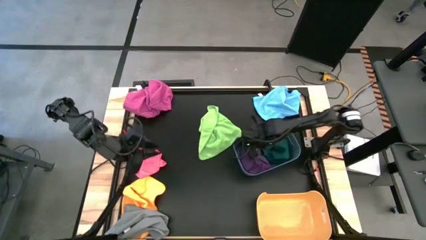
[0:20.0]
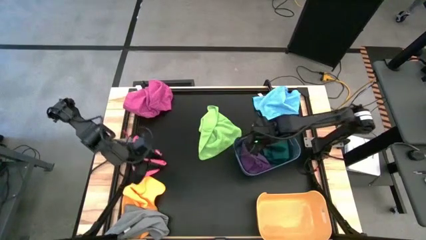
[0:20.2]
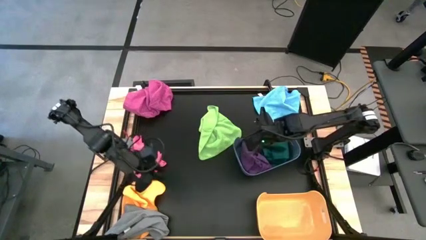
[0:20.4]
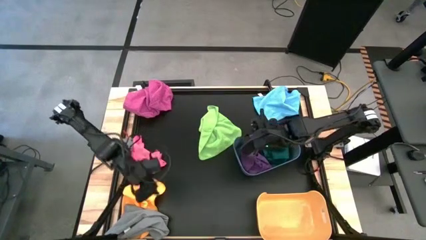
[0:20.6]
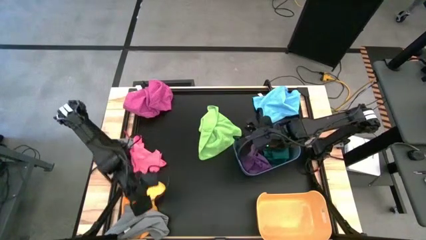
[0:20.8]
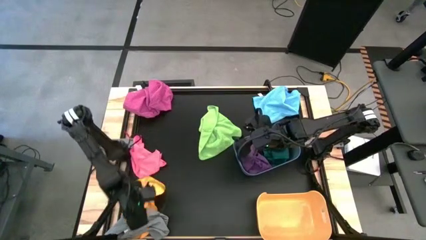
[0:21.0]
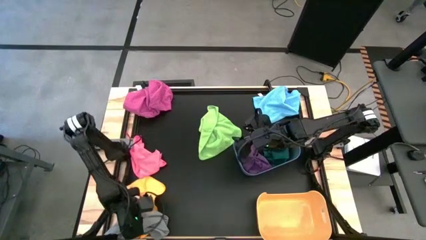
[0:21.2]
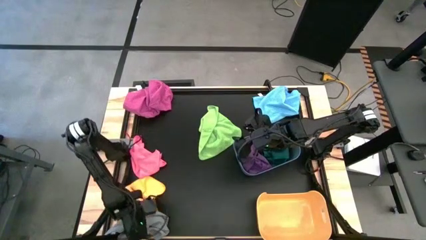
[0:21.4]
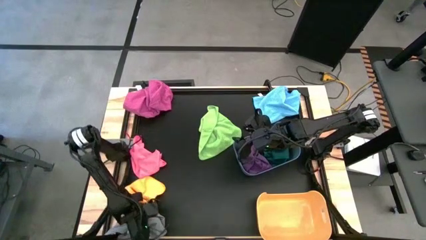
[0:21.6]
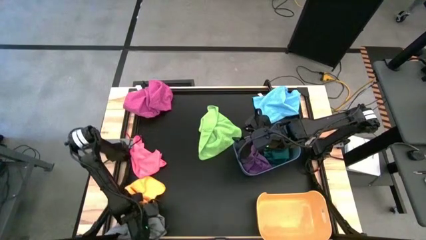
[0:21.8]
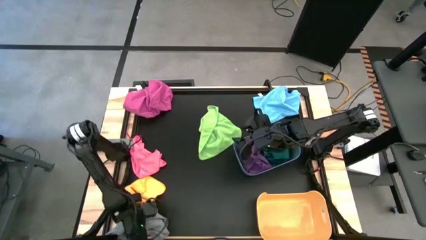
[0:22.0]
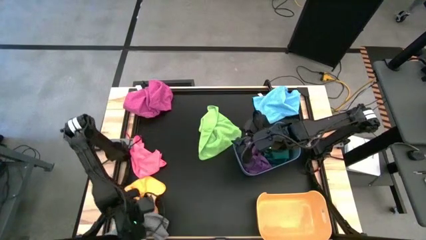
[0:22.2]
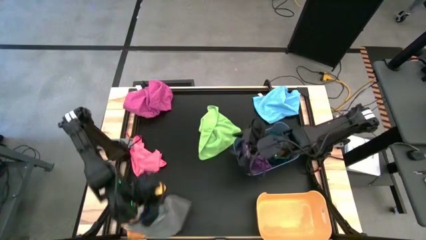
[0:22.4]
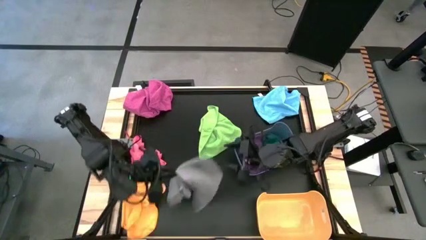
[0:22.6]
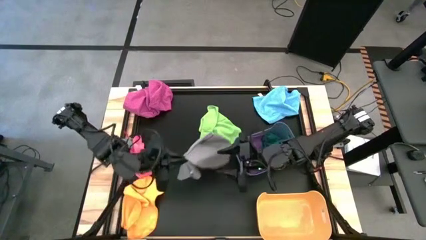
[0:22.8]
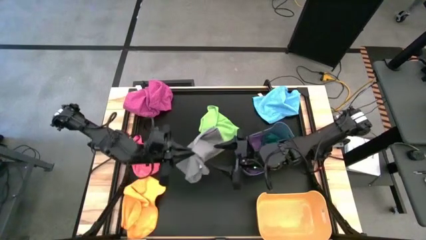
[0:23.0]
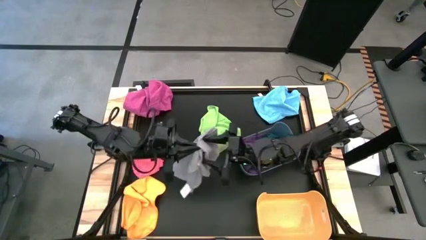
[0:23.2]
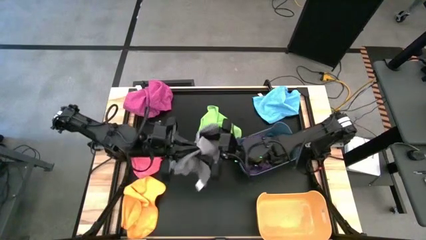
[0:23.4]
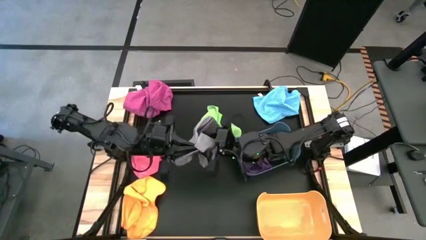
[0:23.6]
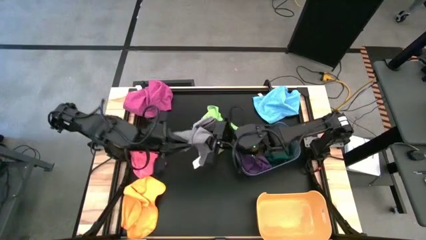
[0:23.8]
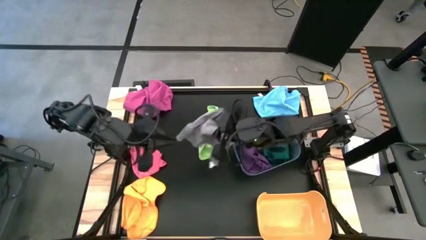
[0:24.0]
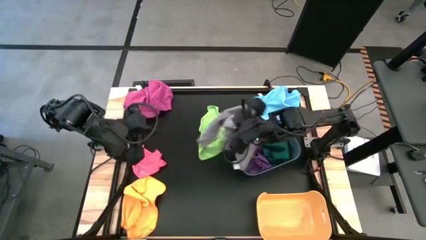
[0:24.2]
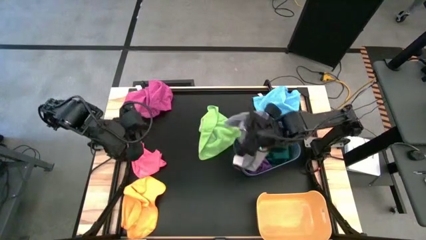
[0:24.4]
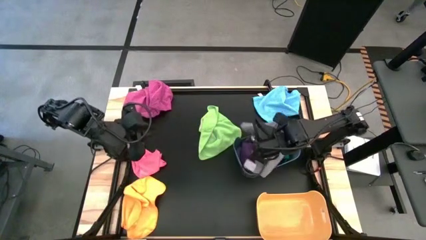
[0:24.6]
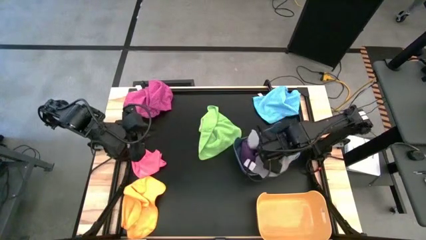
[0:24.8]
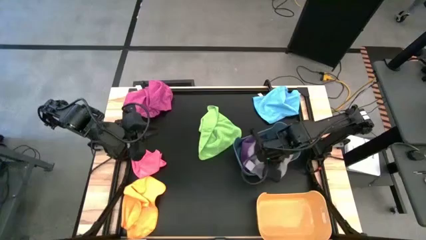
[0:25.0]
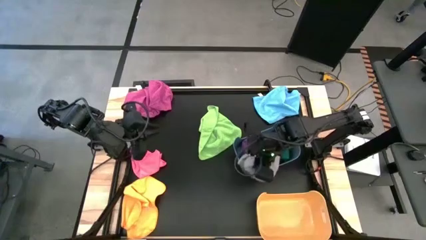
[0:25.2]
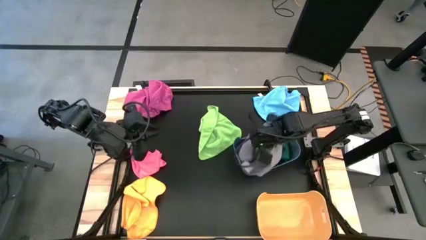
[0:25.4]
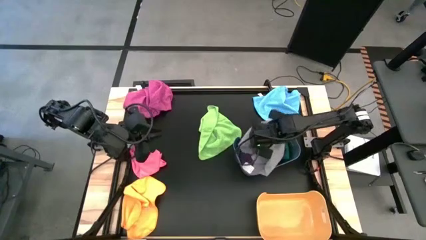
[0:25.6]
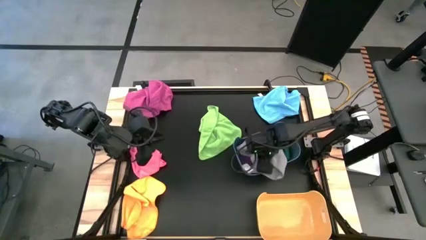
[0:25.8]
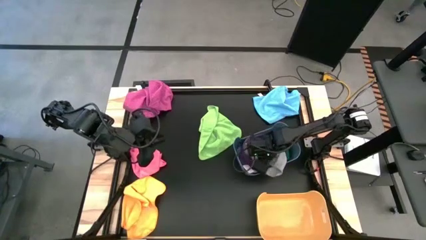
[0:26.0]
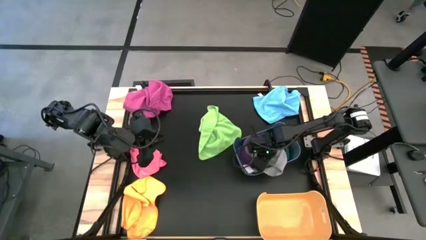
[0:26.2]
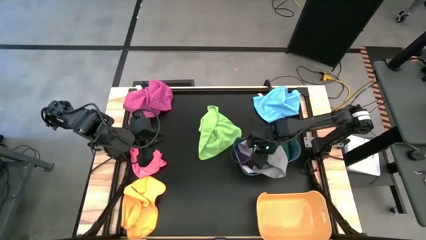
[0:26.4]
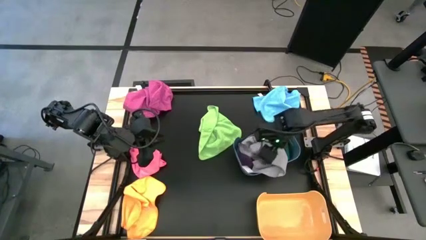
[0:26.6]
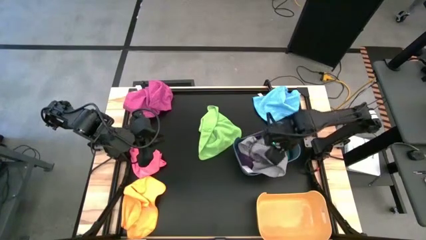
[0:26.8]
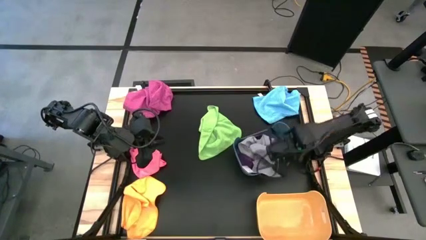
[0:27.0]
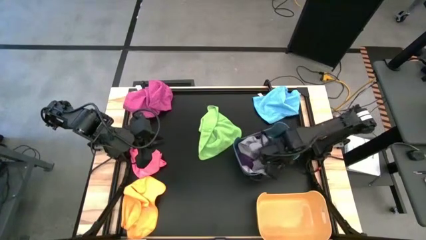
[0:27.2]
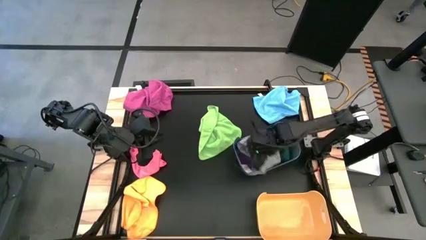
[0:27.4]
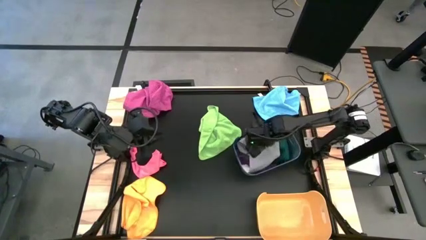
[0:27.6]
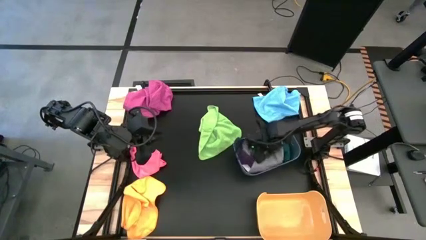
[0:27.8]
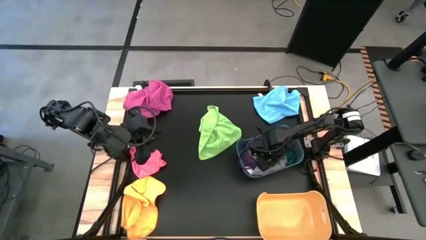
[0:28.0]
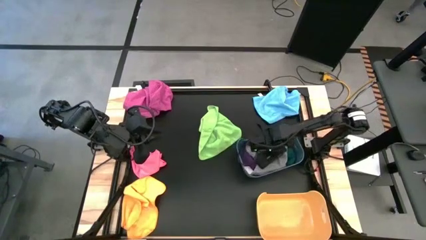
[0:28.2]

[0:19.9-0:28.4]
Task: Sort towels by color in basket
Put the gray towel into the blue bin

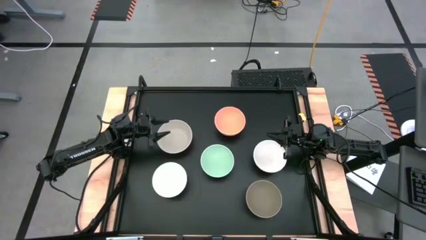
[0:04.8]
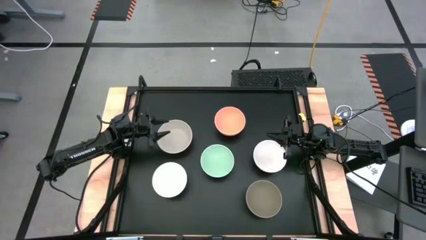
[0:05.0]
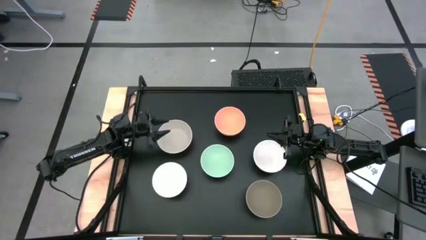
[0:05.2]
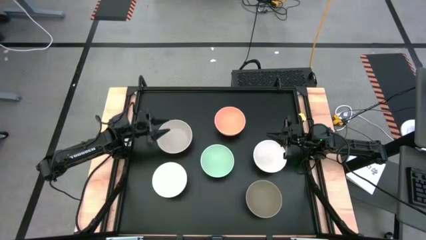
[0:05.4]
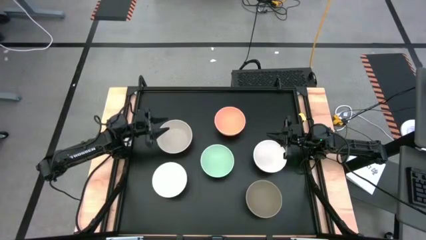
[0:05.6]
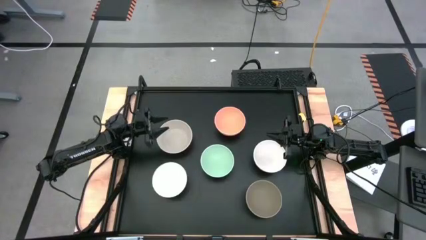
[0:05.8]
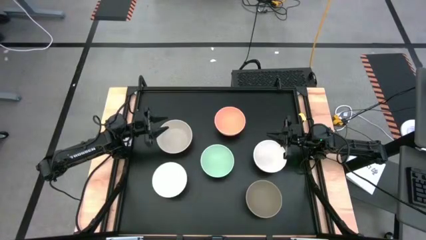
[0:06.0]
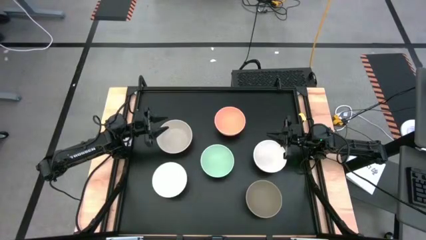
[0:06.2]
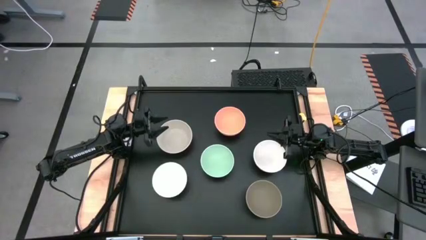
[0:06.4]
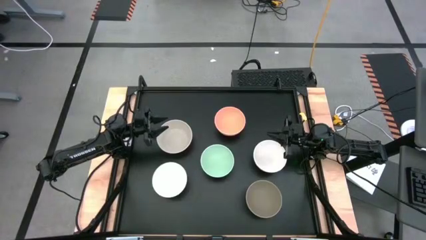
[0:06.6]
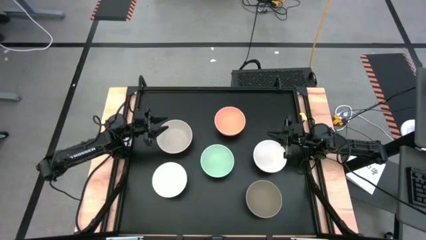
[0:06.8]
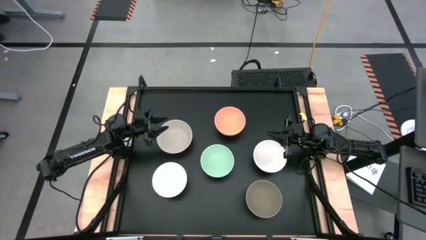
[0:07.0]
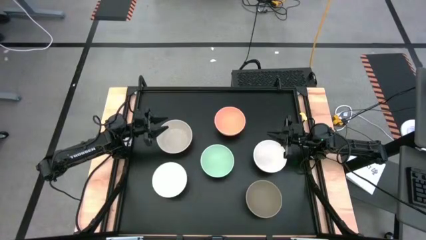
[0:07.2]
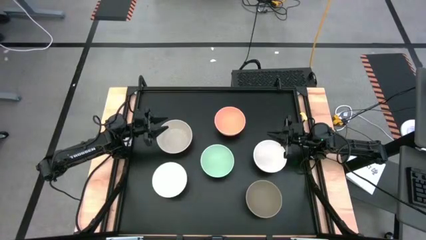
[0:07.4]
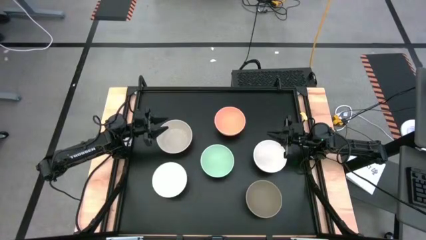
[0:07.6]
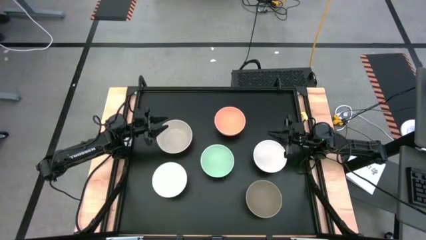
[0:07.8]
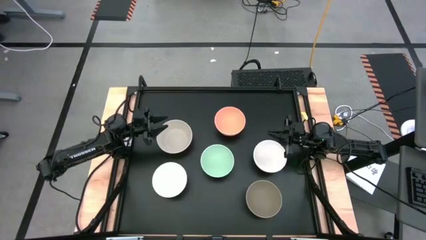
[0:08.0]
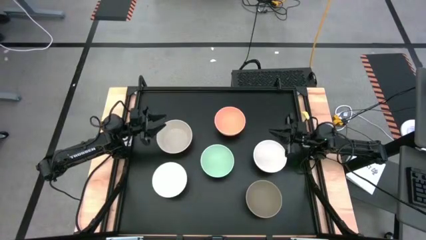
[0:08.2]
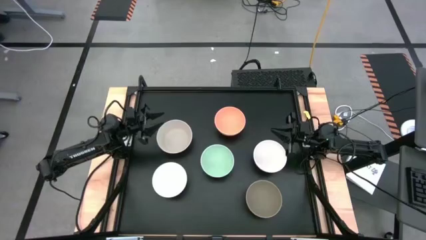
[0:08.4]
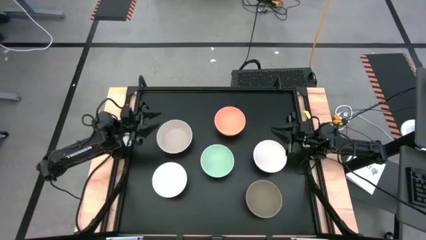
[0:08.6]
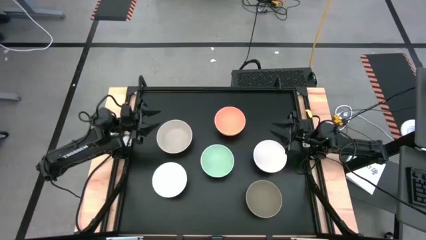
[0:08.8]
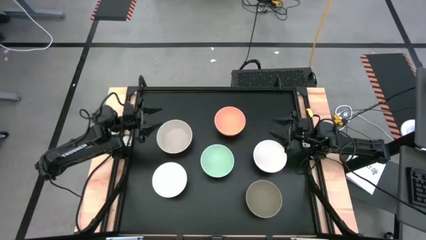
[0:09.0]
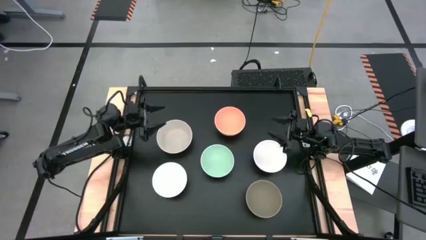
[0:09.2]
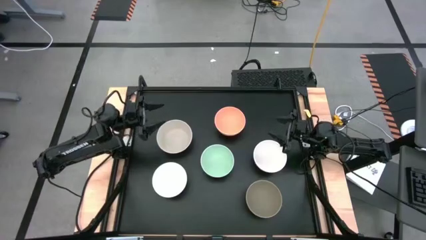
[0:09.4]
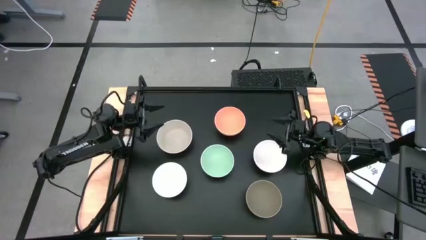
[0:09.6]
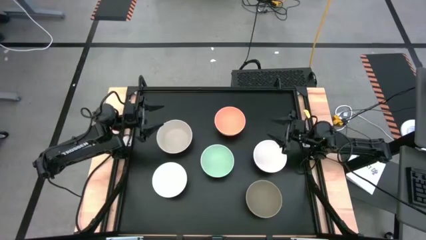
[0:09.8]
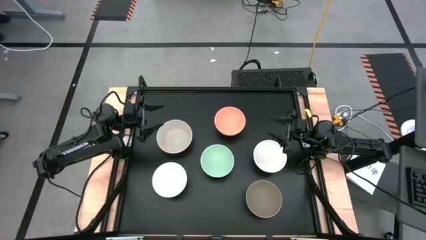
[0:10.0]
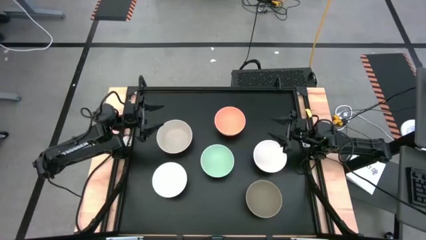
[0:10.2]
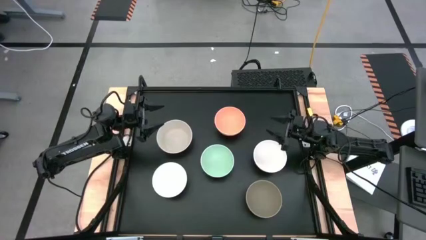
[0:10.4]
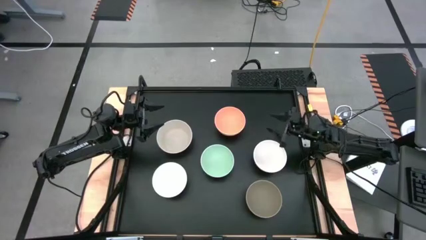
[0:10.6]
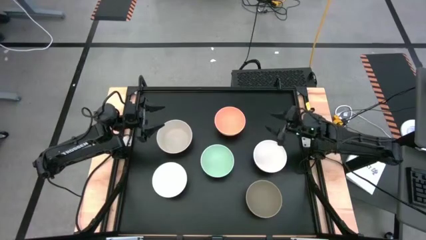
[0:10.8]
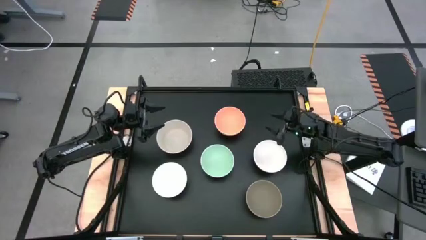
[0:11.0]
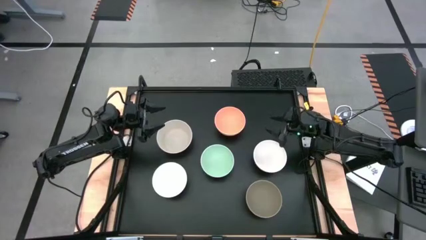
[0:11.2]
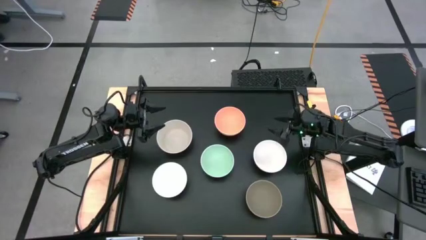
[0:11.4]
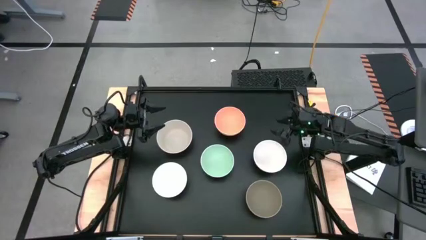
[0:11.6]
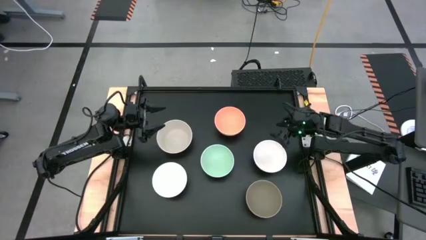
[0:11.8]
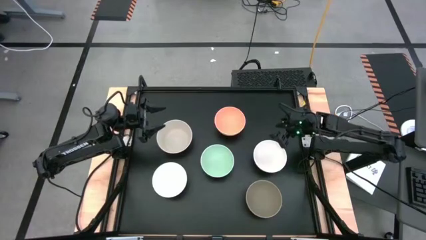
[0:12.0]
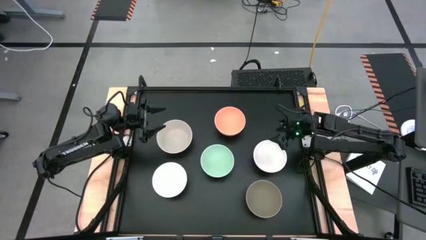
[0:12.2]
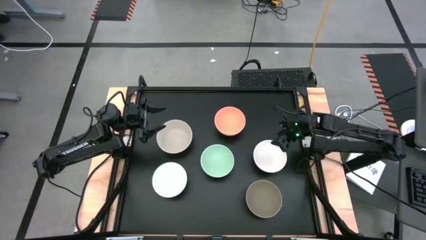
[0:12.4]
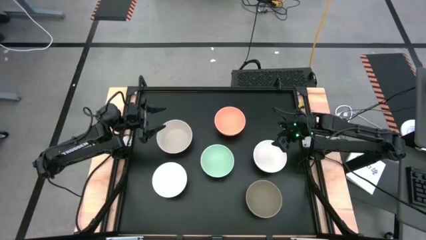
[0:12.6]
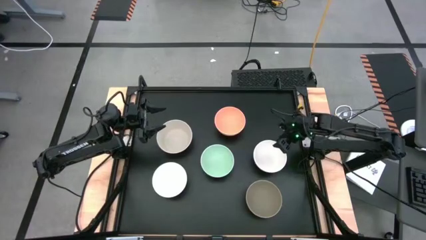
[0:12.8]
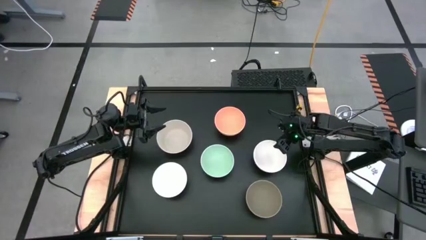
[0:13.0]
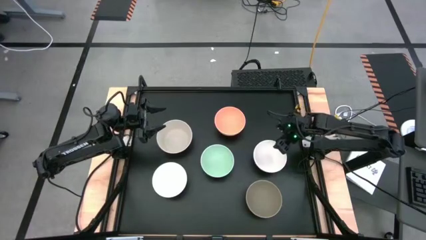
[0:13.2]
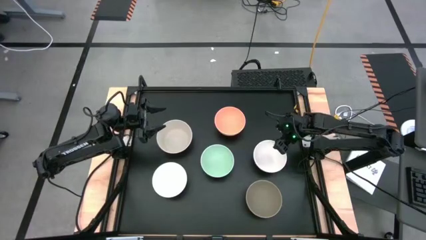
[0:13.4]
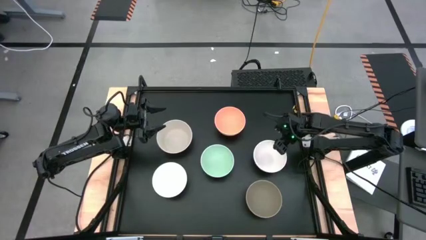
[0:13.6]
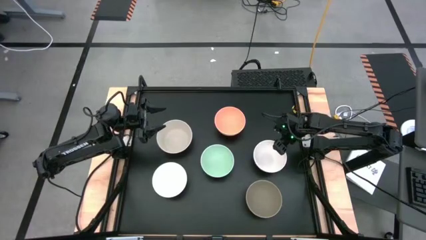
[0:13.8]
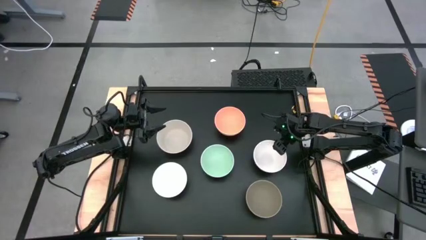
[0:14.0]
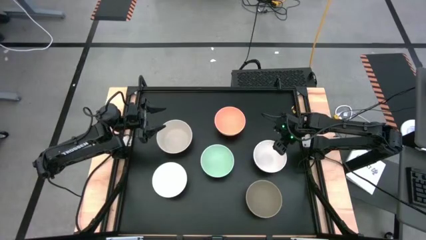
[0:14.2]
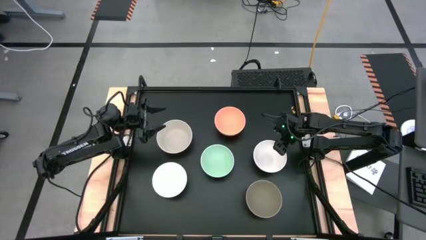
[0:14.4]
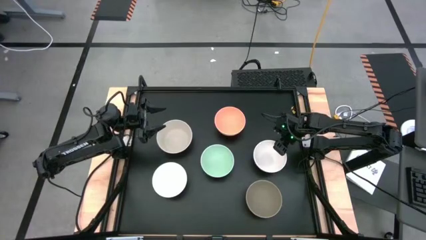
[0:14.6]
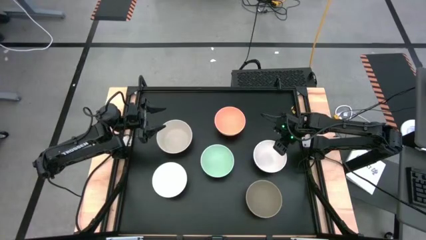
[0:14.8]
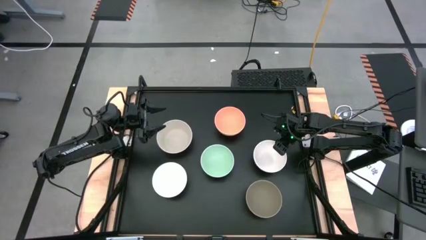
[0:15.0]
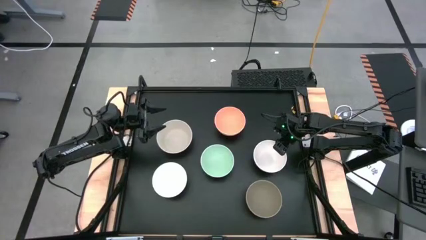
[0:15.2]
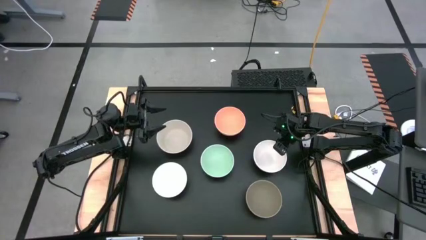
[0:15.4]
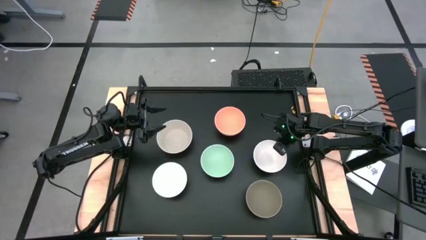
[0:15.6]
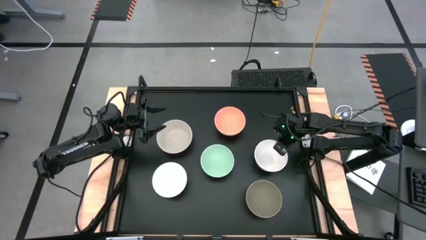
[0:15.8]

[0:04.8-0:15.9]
Task: Nest bowls inside each other
Stack the right white bowl on the green bowl
